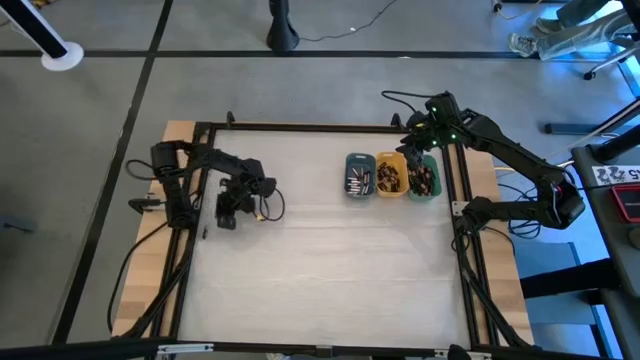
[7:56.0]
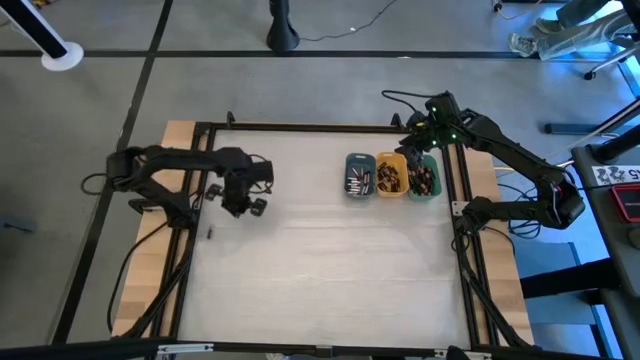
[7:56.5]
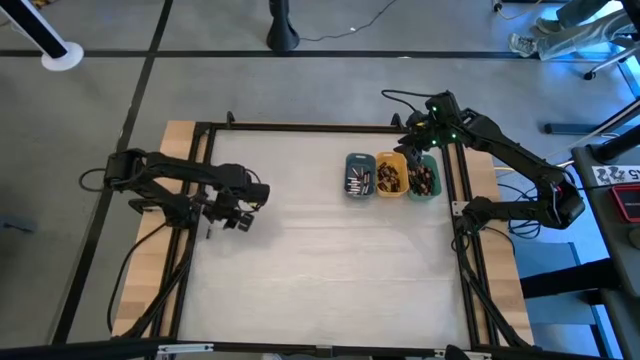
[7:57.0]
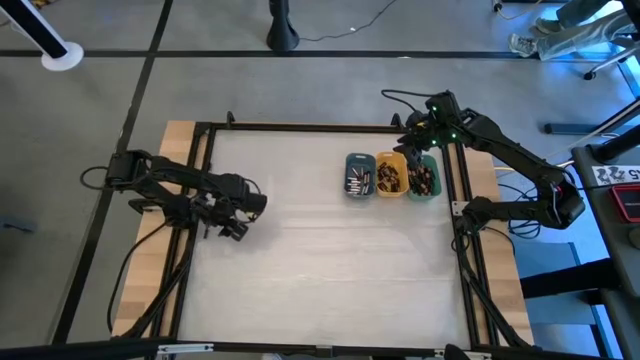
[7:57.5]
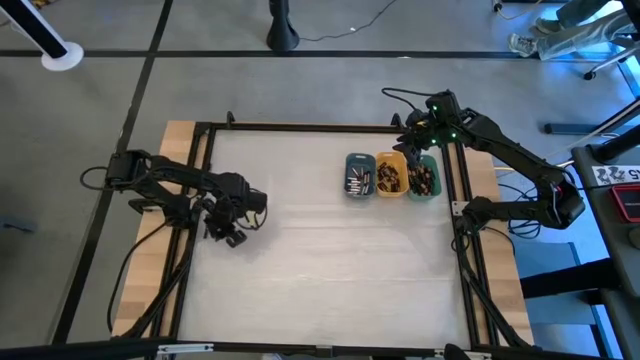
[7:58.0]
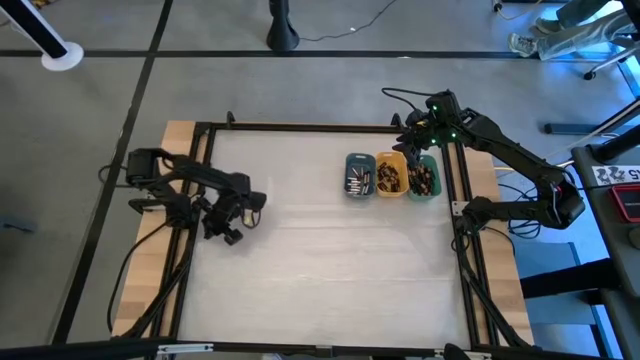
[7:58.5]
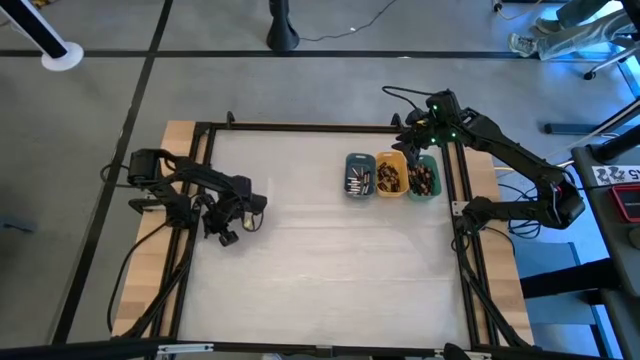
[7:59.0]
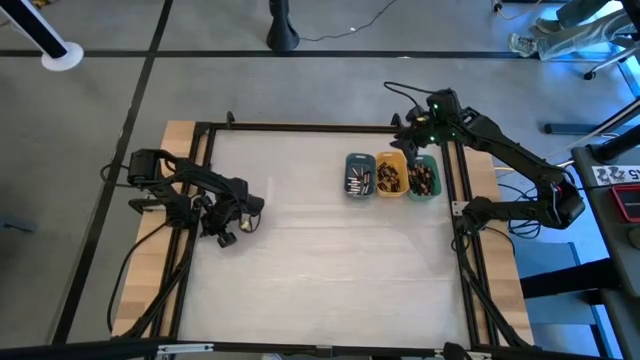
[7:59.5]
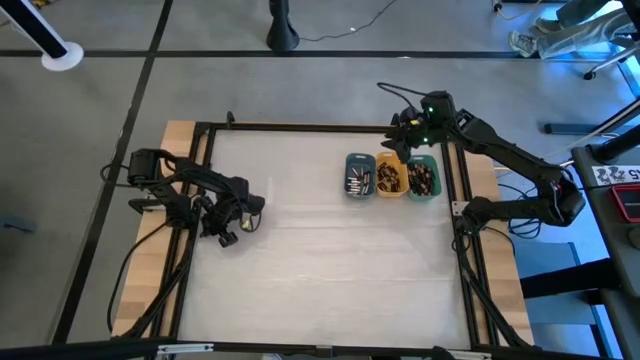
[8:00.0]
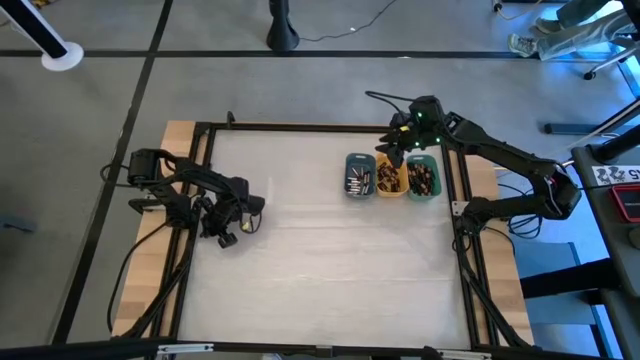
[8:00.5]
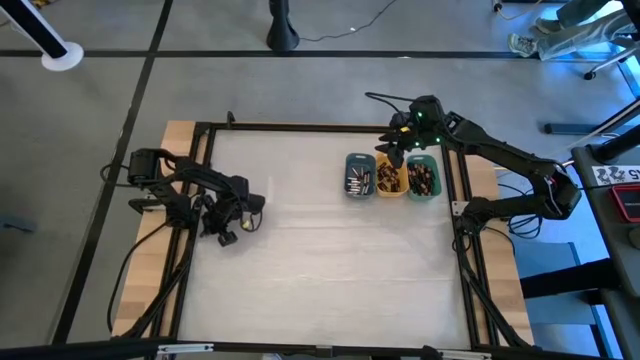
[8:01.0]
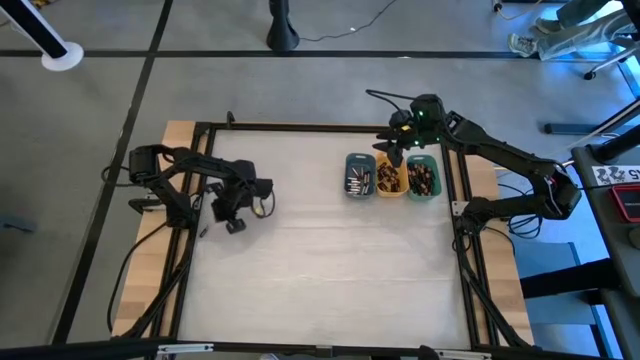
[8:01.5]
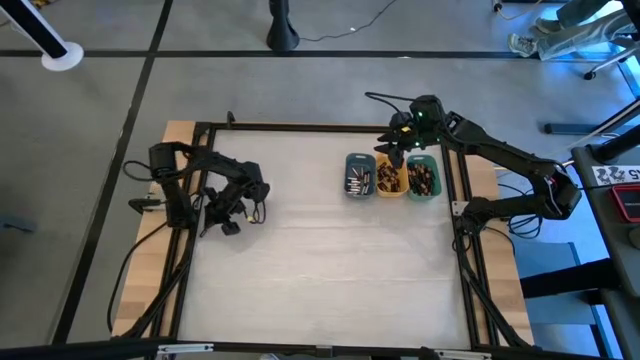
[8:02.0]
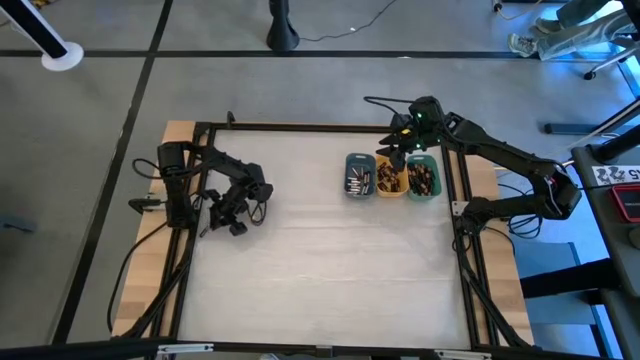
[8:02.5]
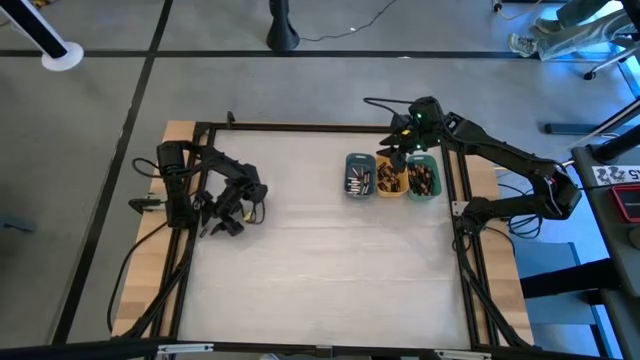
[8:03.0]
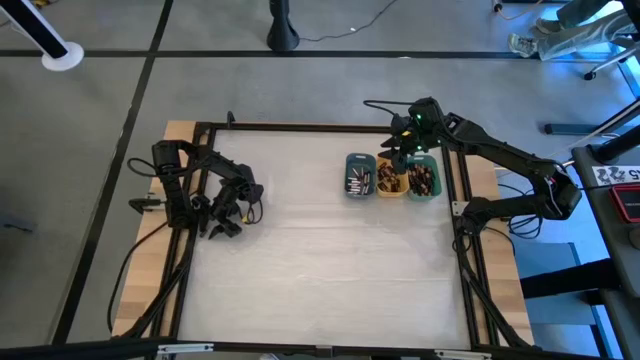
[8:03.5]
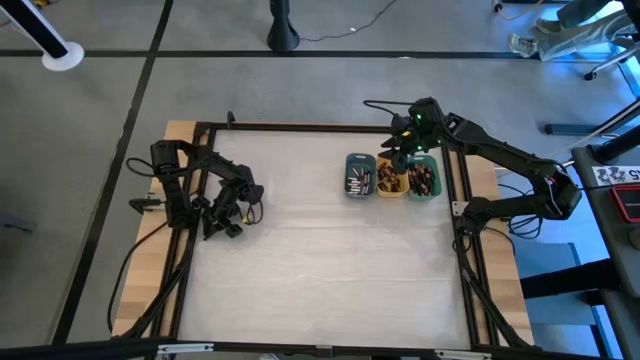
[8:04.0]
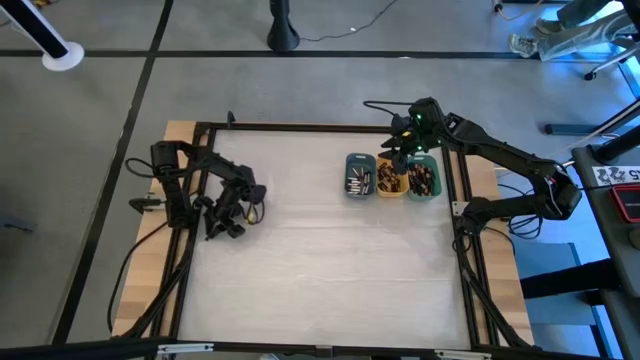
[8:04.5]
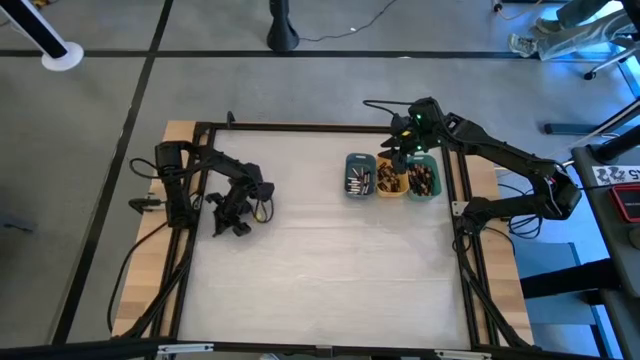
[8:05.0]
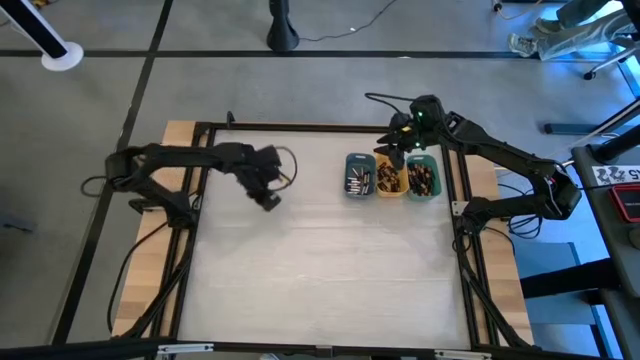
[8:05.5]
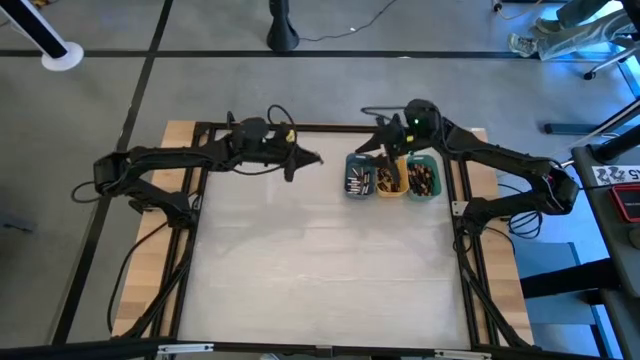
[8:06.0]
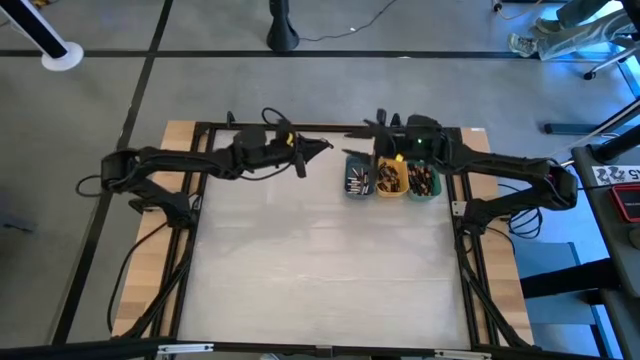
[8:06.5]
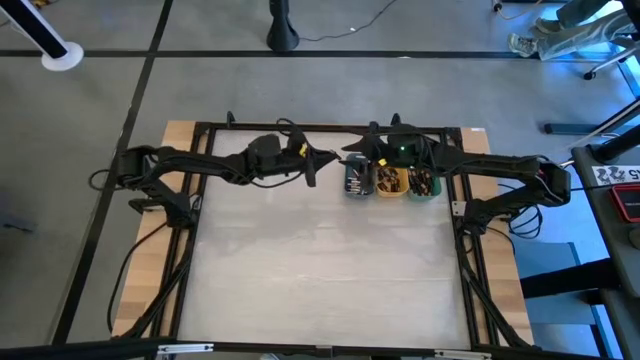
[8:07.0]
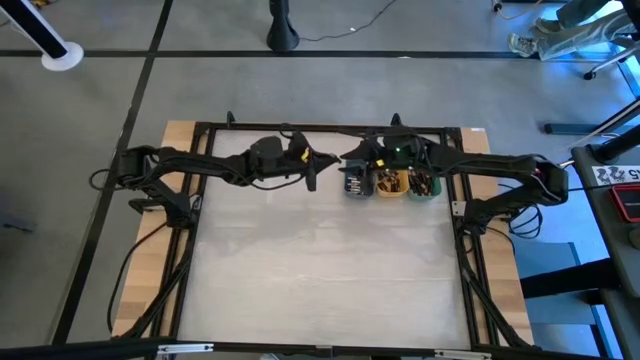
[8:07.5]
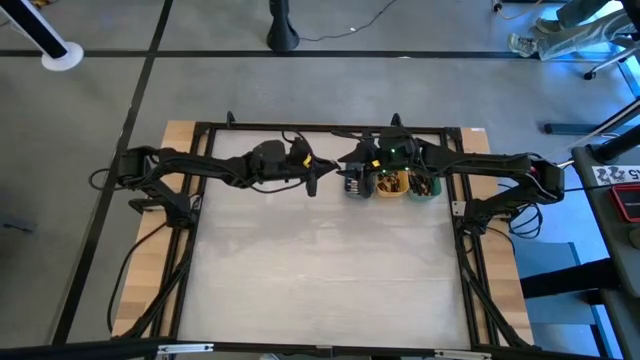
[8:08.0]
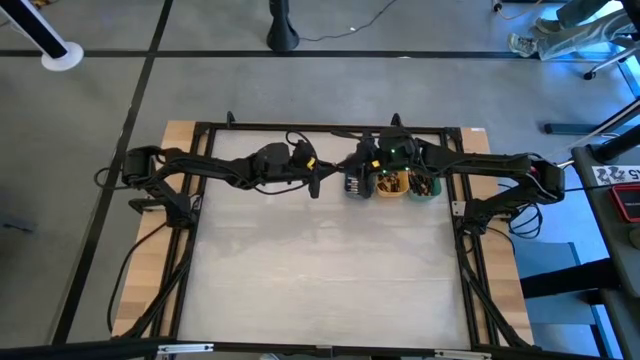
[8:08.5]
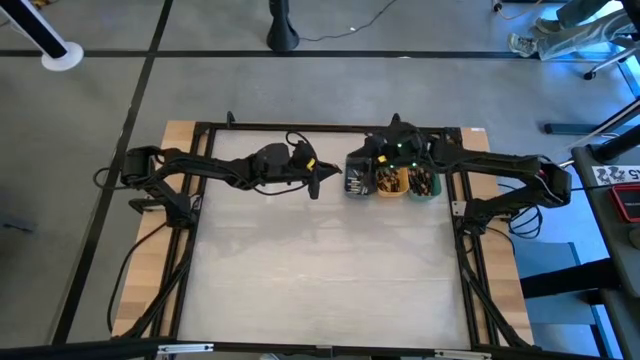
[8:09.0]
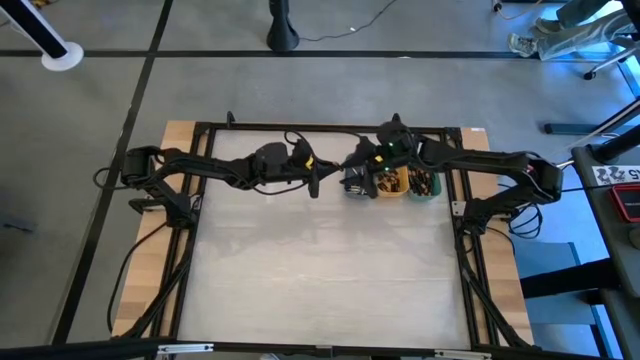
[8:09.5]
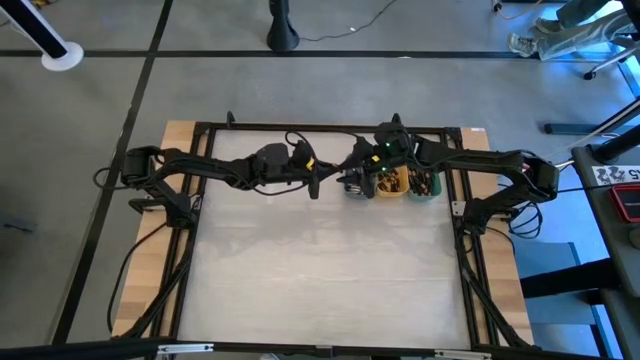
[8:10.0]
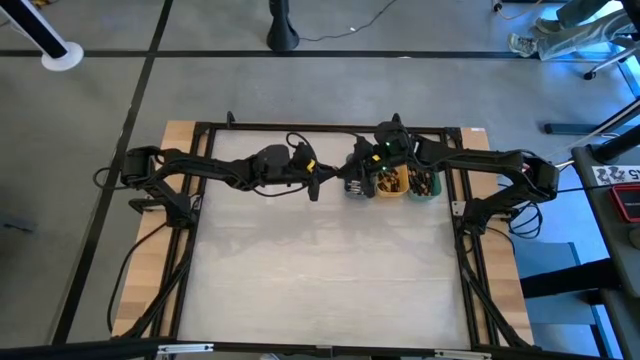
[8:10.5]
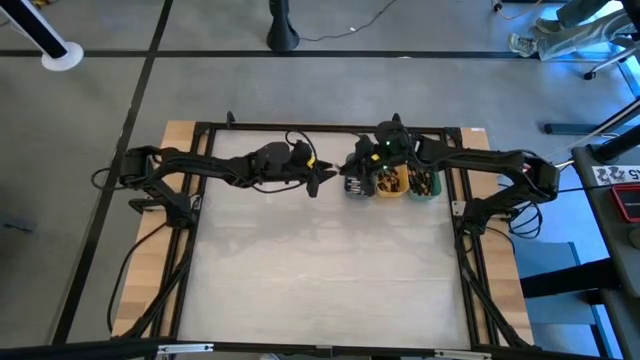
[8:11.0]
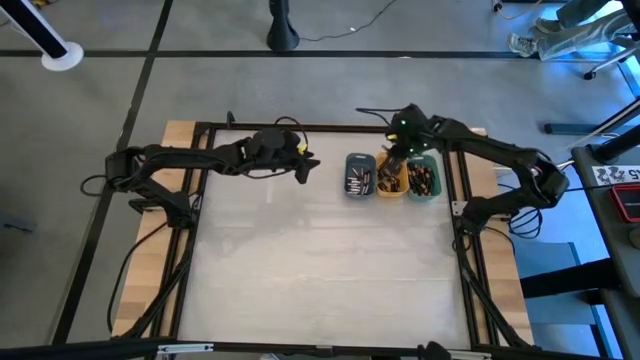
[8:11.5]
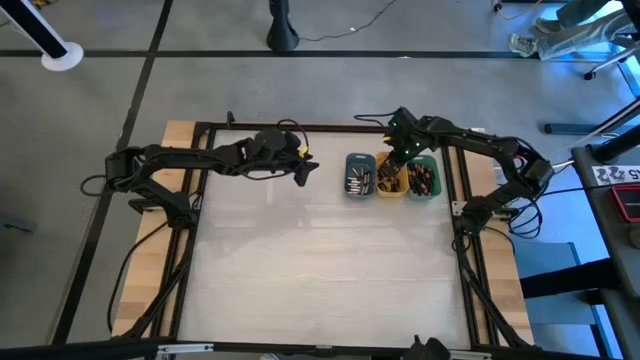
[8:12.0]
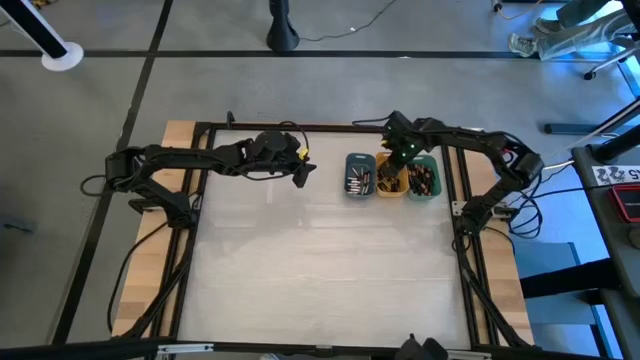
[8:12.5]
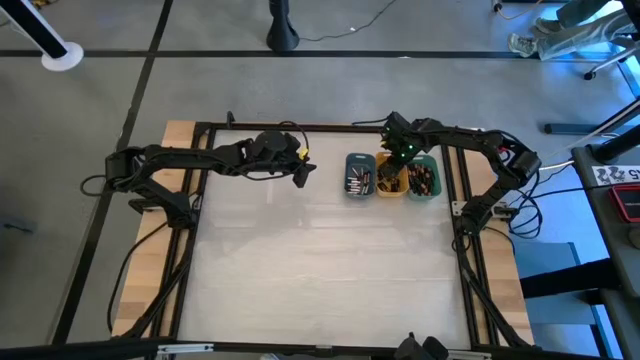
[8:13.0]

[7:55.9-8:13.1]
Task: Sort batteries
Put the black battery into the yellow bin

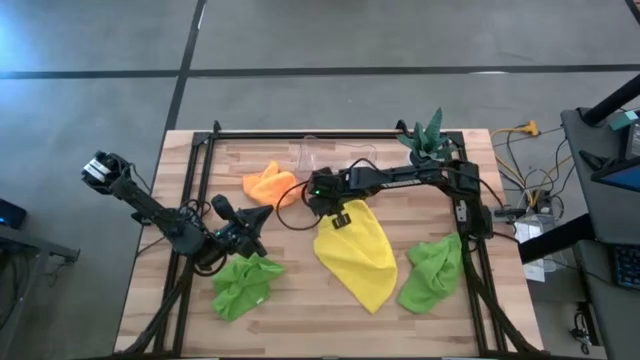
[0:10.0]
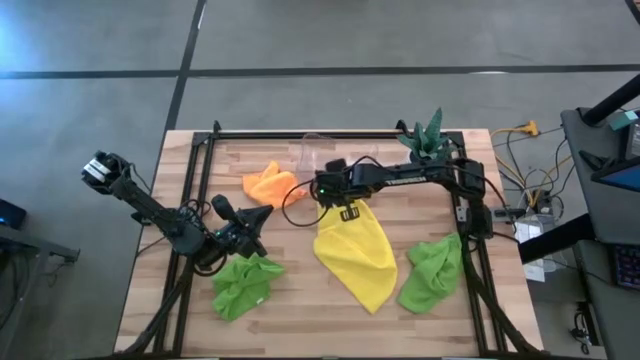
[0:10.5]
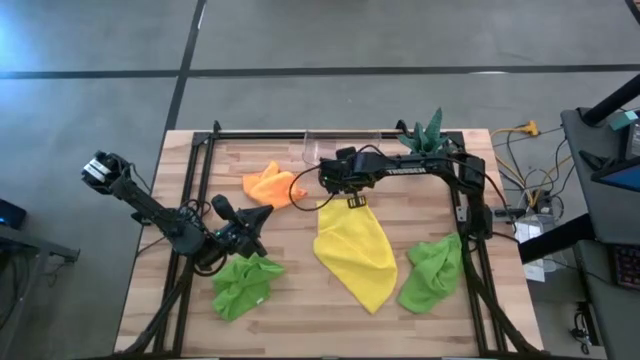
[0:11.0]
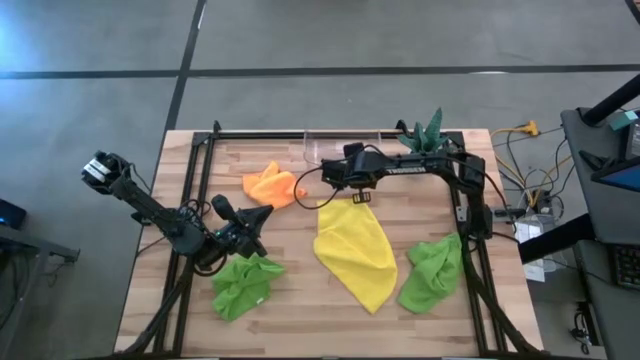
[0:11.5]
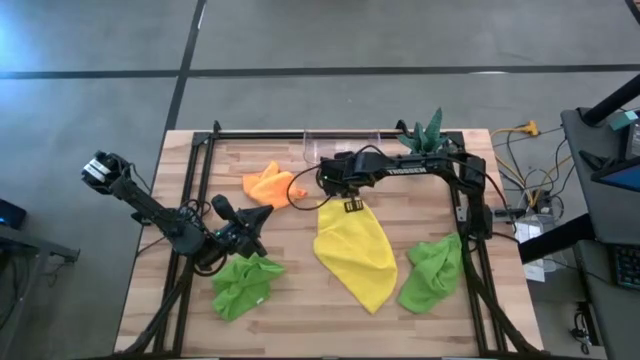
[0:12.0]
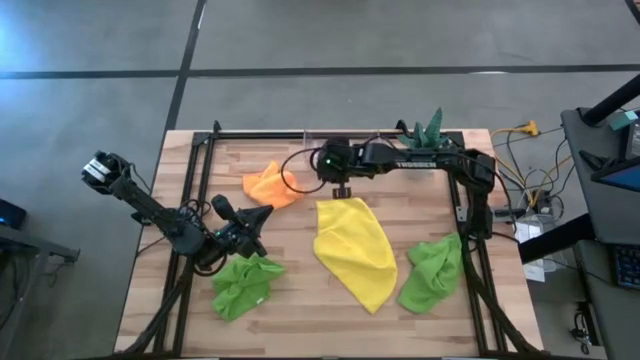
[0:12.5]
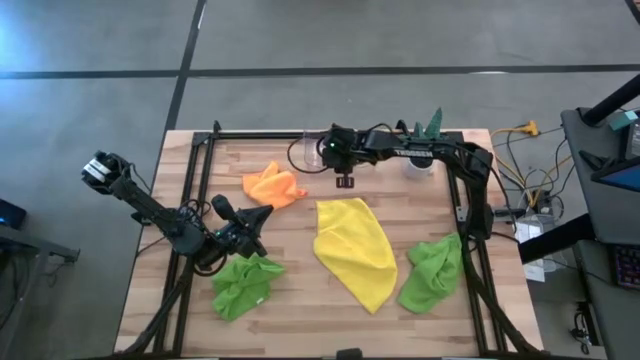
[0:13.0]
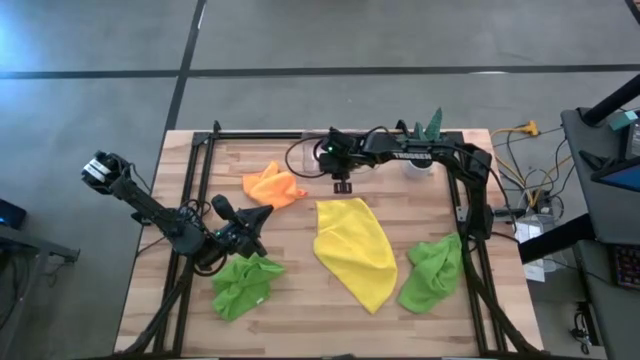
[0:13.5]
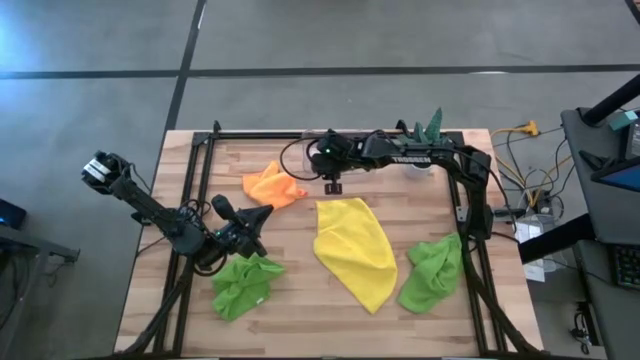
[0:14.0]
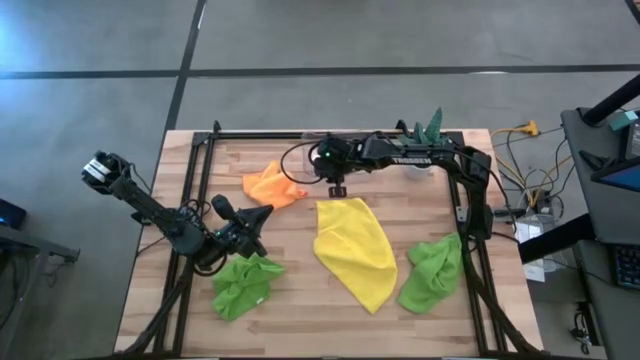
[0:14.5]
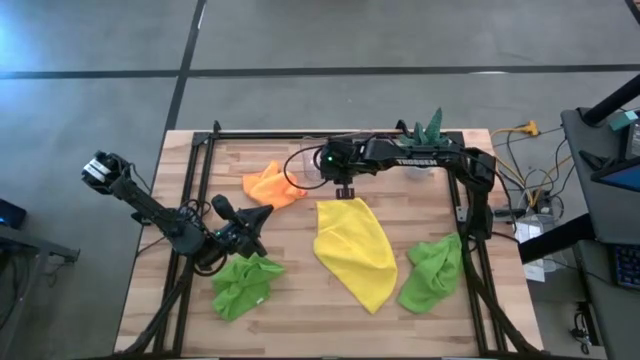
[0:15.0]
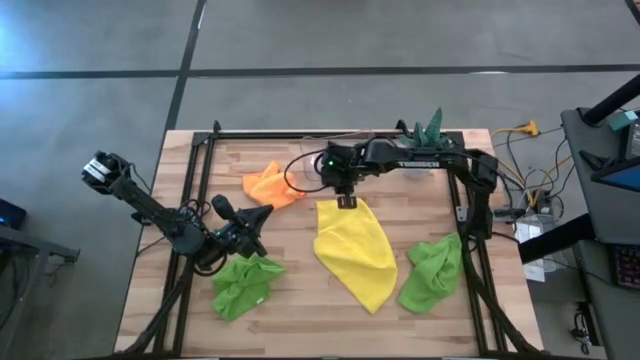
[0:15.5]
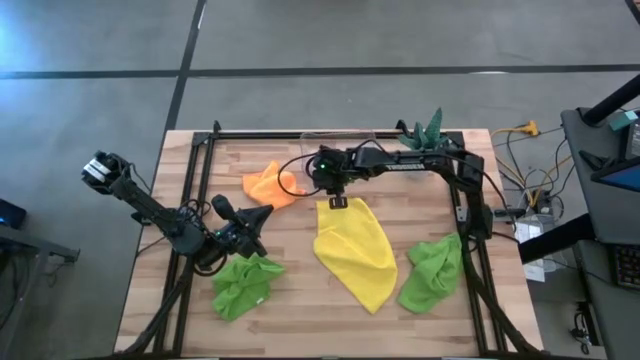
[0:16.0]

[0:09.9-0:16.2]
Task: Fold microfiber towels
Adjust the transparent bin
